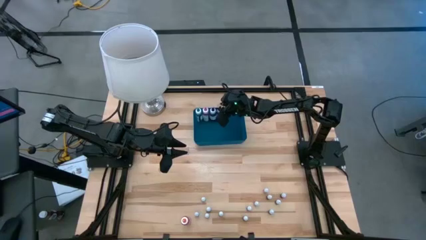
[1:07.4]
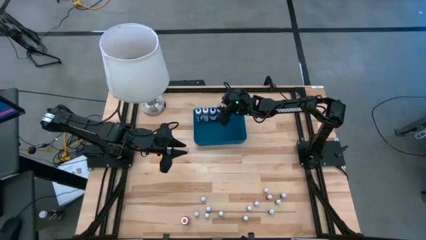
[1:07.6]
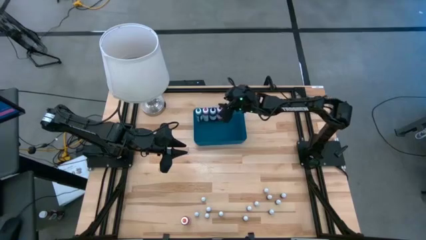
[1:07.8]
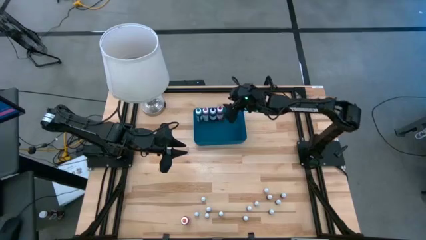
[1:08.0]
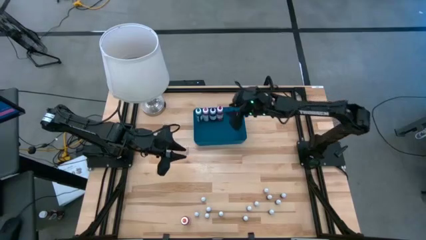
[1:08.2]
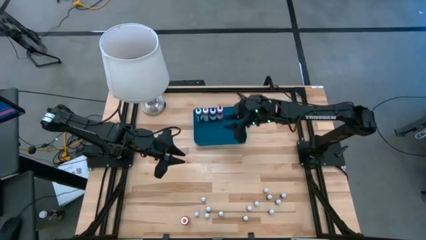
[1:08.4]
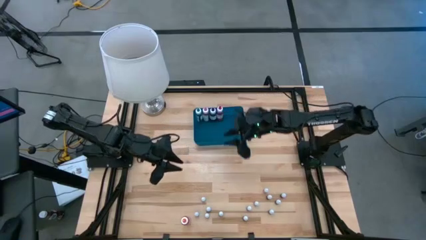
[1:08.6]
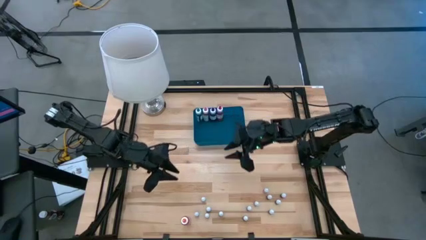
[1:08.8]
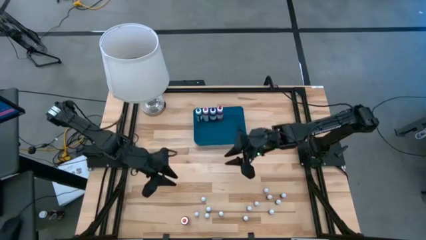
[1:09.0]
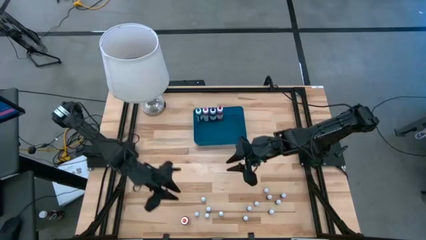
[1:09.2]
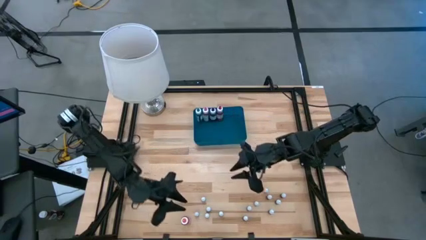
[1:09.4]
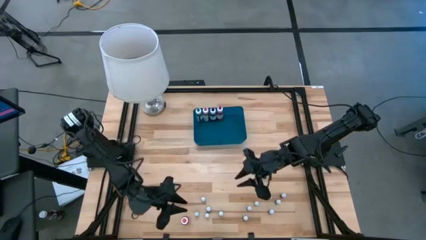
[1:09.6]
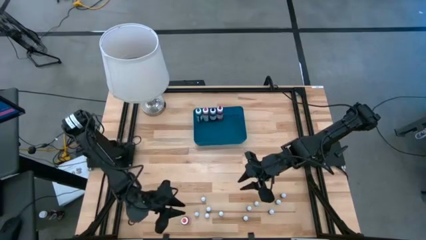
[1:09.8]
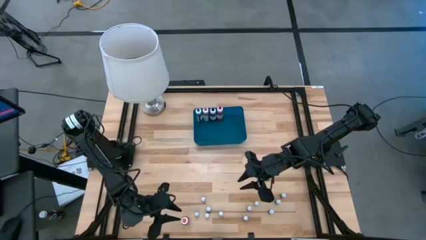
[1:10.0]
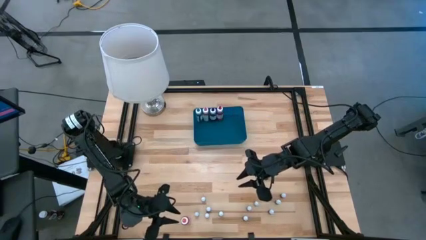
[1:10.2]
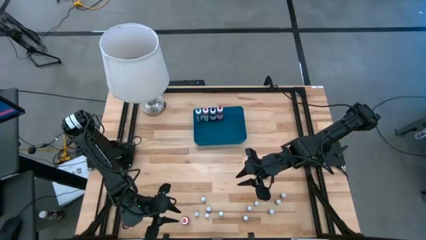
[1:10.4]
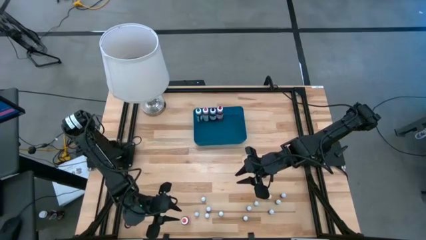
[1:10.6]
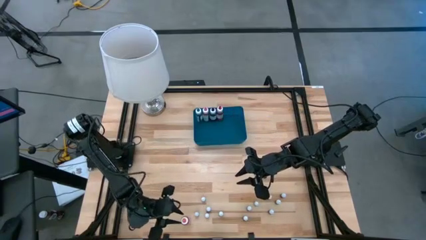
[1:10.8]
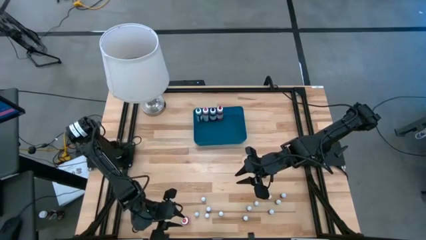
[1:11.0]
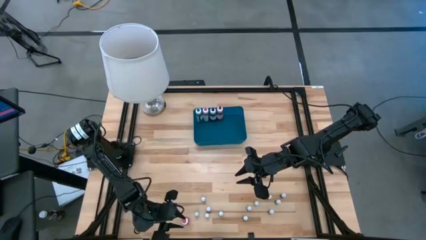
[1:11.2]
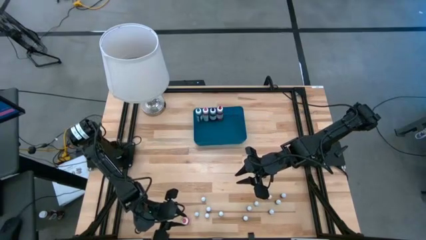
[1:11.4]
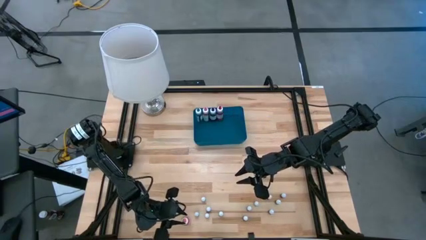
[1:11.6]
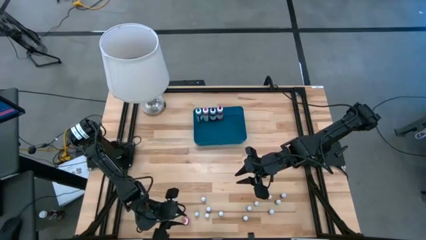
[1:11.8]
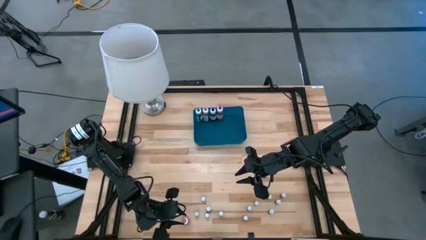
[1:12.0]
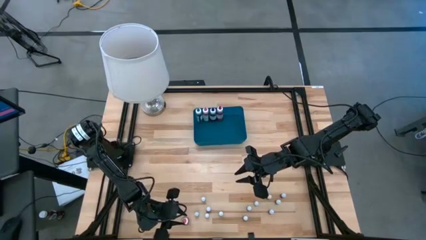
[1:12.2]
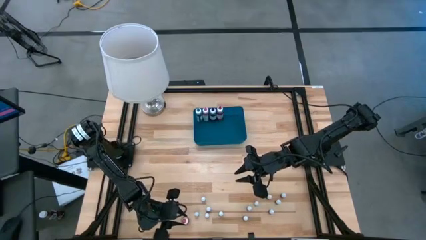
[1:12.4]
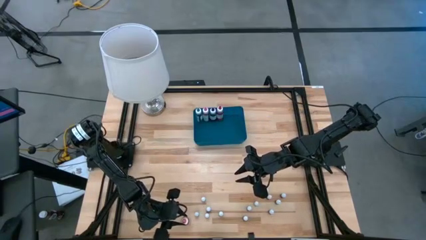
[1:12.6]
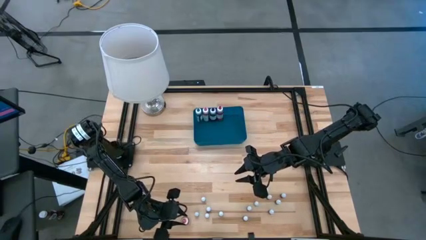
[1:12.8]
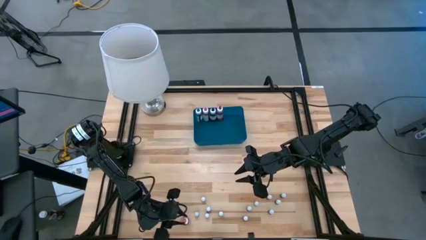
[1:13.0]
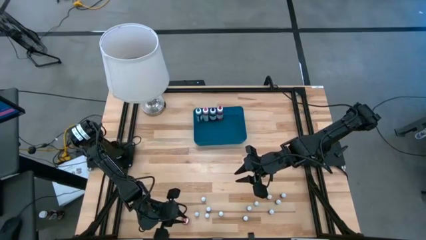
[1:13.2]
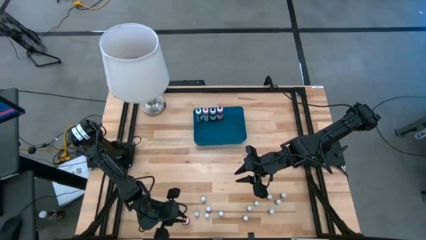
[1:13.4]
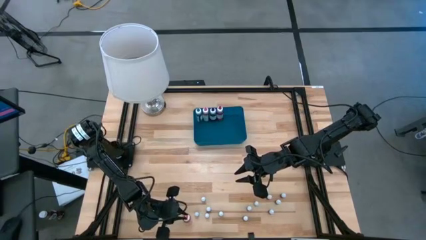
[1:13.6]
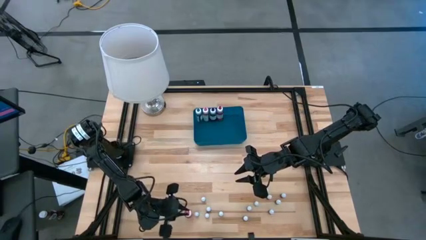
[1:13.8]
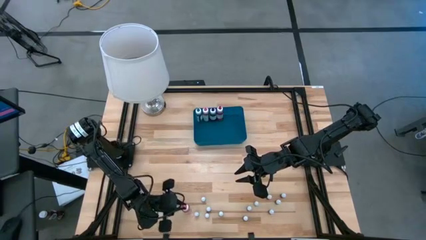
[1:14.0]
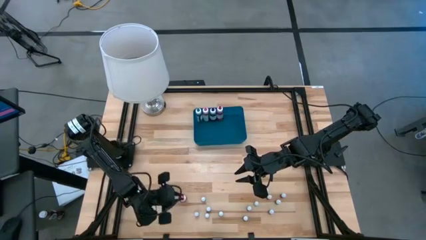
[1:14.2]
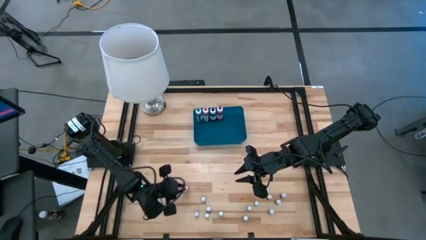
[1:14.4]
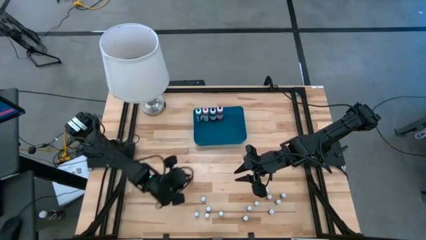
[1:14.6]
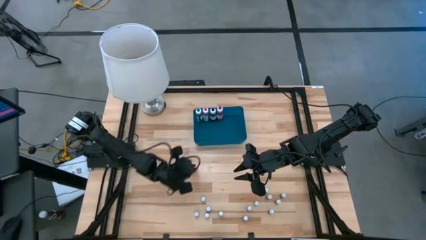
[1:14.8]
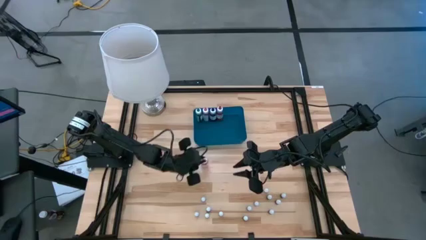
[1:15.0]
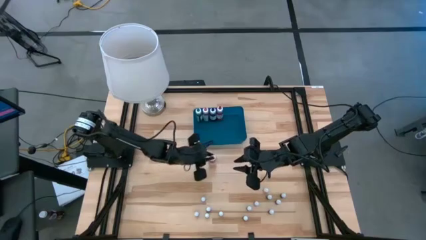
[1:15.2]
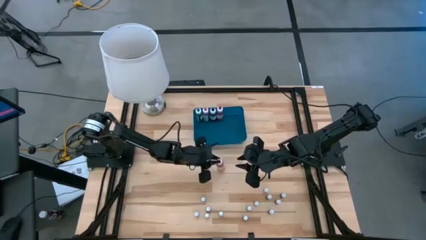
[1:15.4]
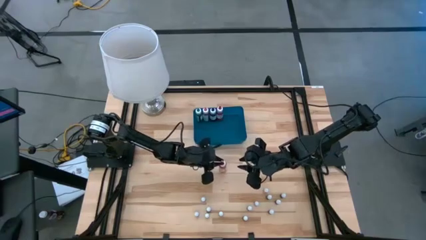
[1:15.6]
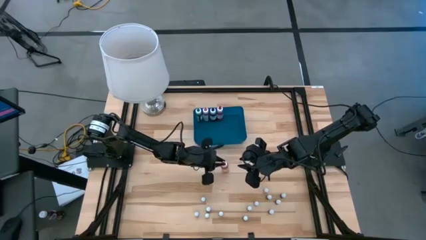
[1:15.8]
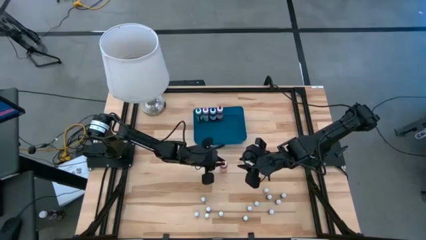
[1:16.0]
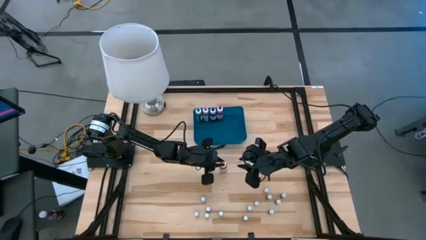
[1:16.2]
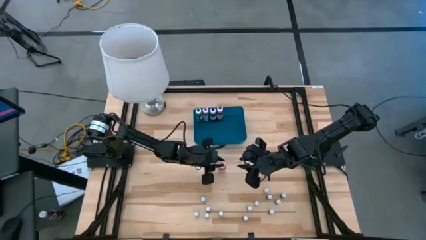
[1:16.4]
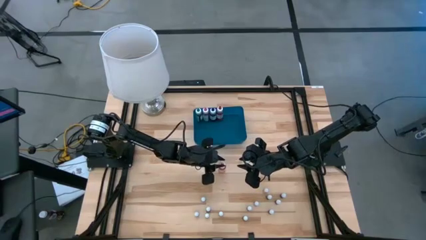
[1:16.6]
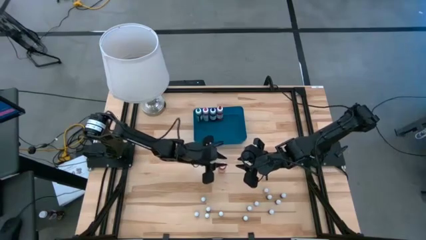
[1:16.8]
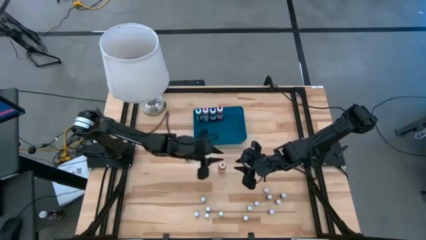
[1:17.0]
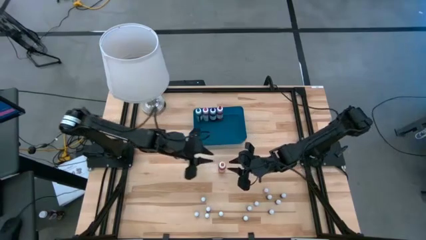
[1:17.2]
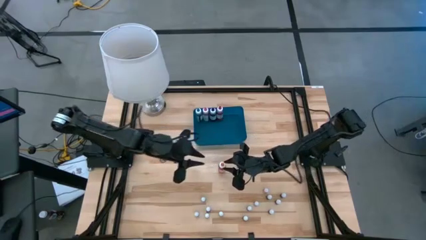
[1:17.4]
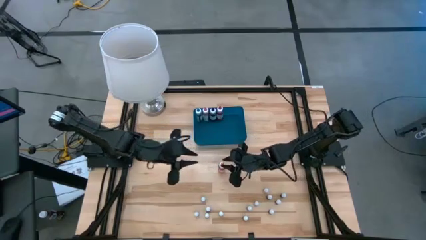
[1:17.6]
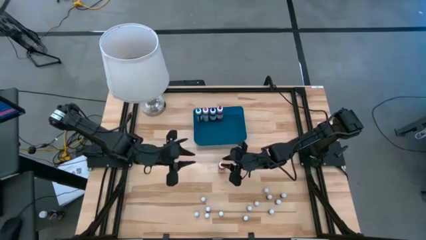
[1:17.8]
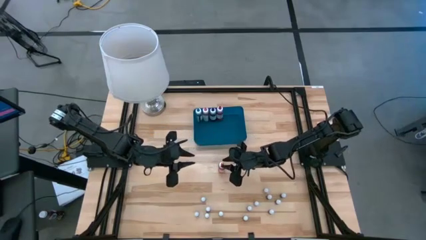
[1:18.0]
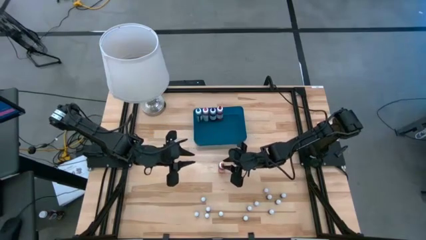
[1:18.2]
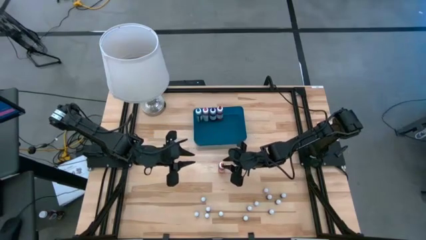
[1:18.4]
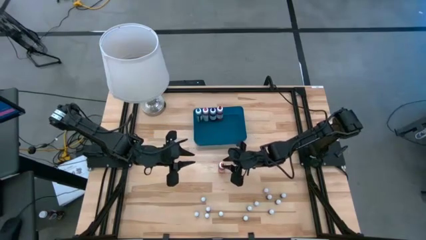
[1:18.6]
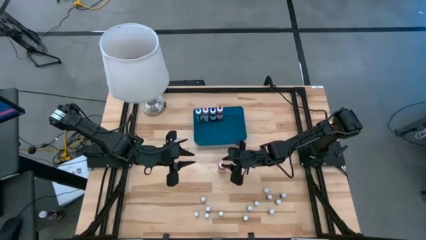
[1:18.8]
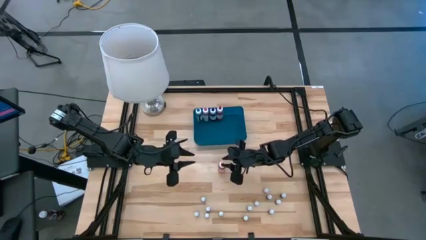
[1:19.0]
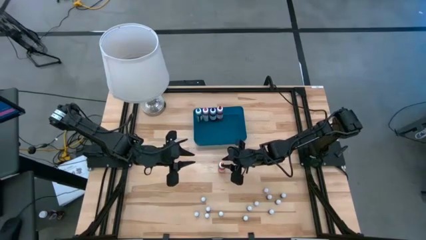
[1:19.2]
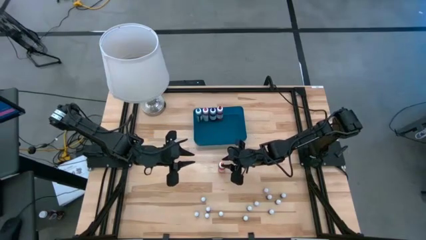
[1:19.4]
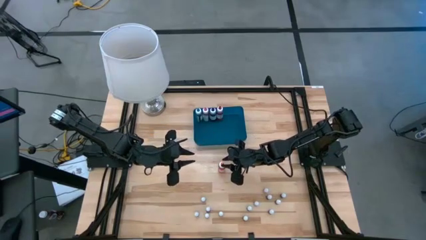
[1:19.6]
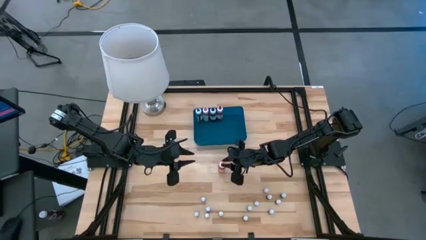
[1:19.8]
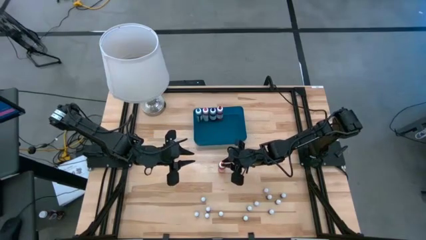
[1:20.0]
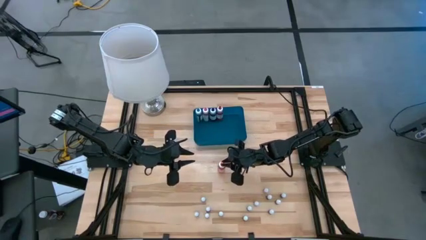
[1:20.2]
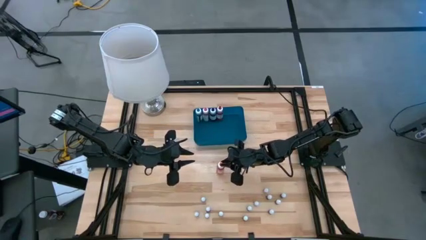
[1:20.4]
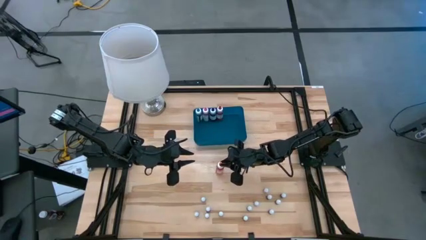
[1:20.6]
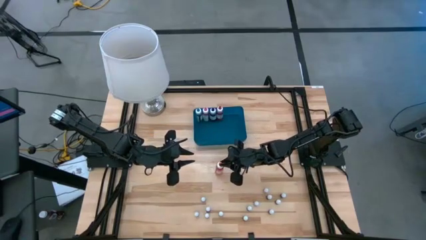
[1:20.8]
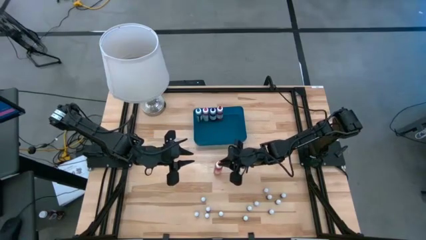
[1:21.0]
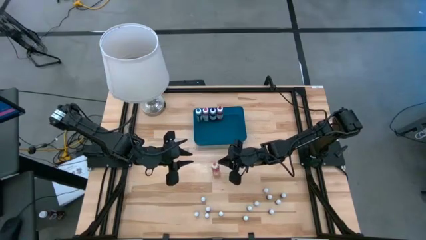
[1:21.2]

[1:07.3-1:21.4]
Task: Pick & Place food coloring
Put the large orange food coloring bottle into the bin
